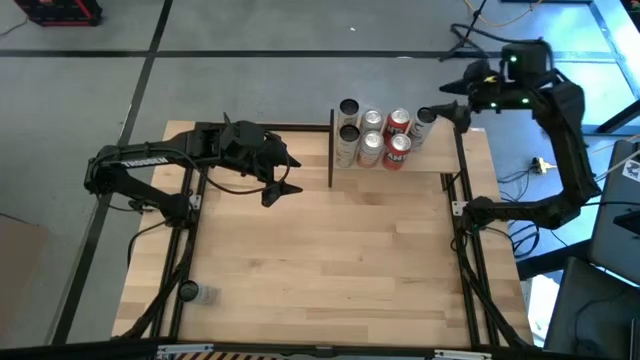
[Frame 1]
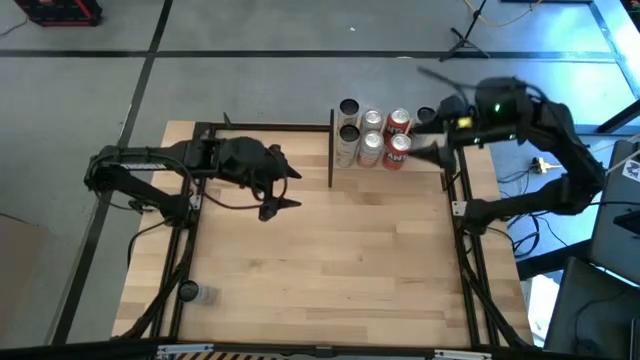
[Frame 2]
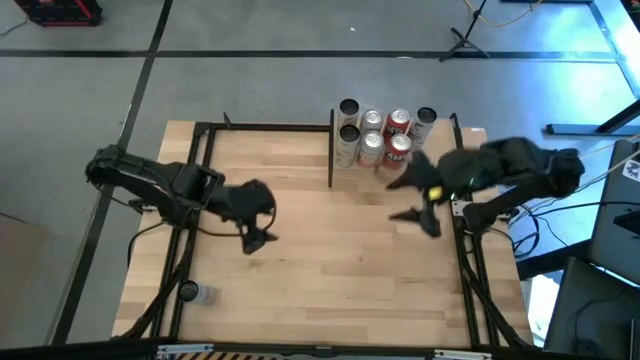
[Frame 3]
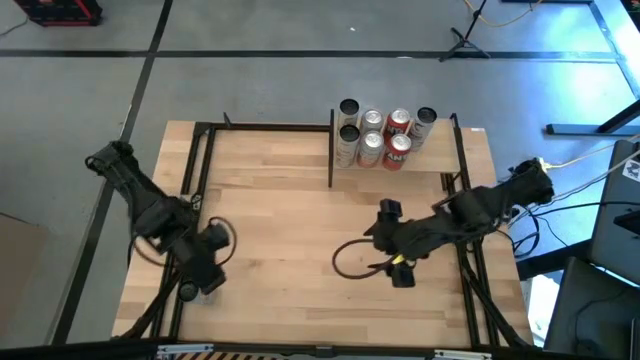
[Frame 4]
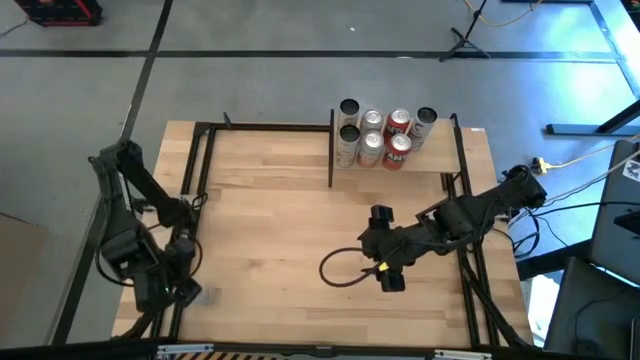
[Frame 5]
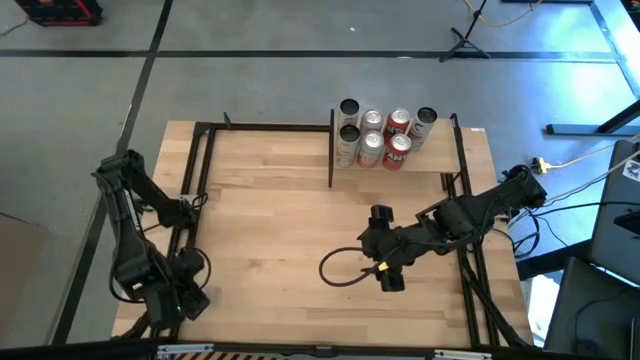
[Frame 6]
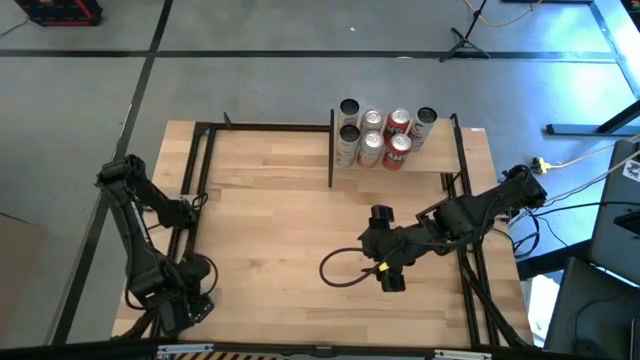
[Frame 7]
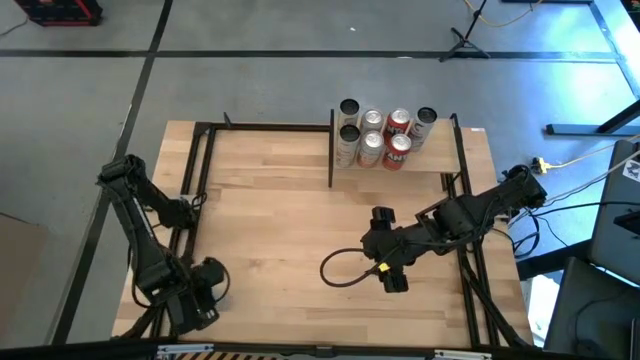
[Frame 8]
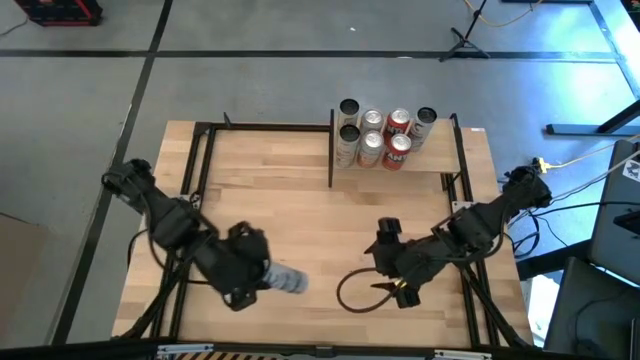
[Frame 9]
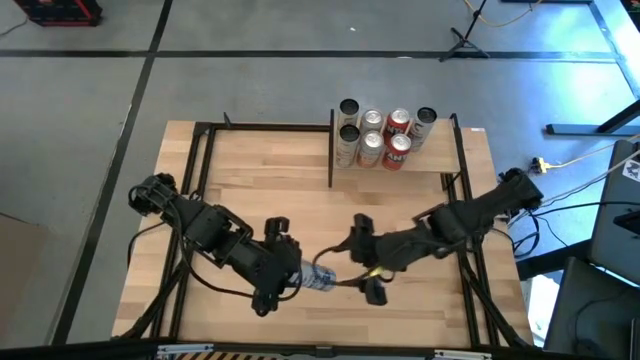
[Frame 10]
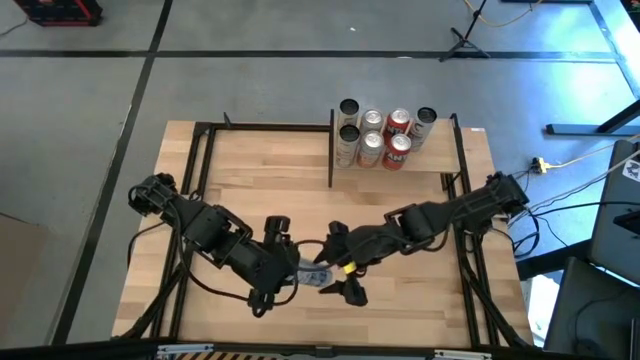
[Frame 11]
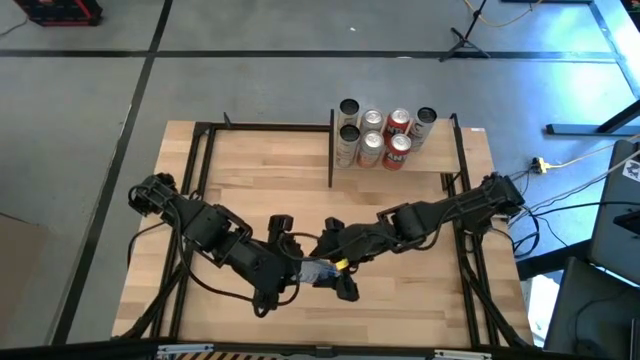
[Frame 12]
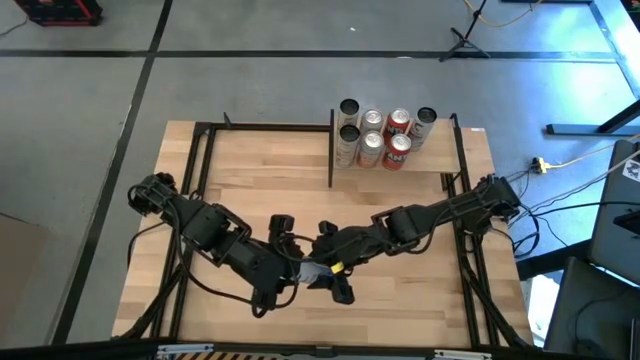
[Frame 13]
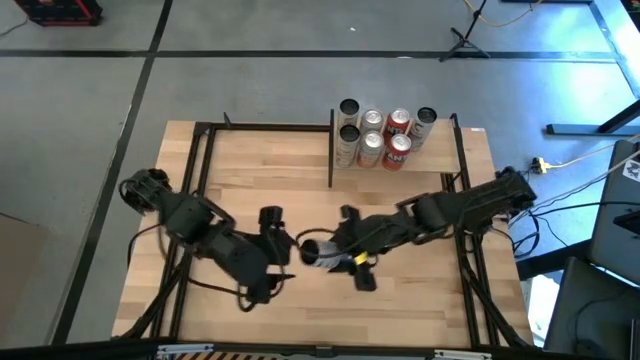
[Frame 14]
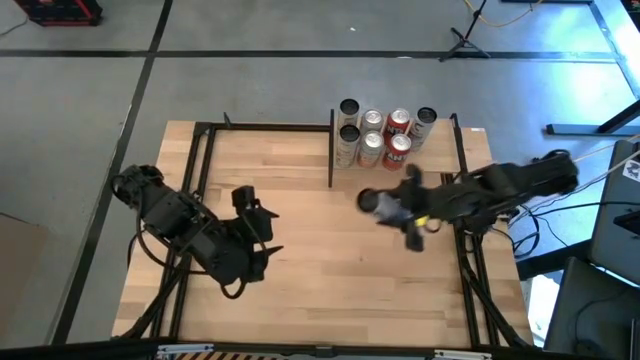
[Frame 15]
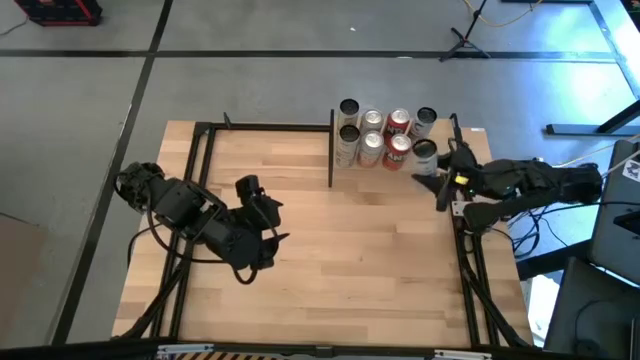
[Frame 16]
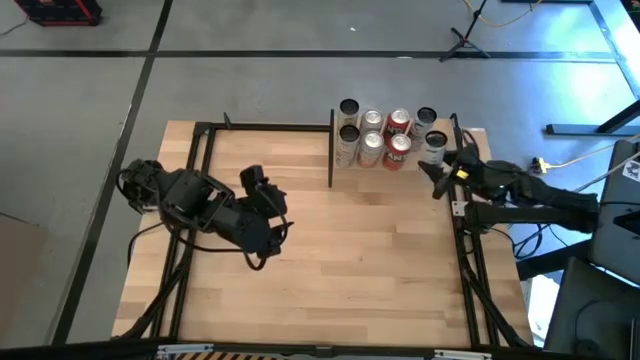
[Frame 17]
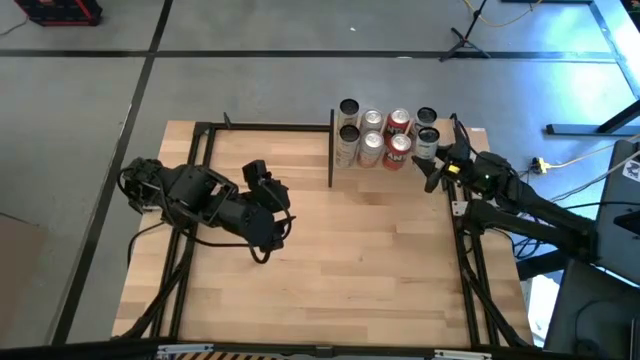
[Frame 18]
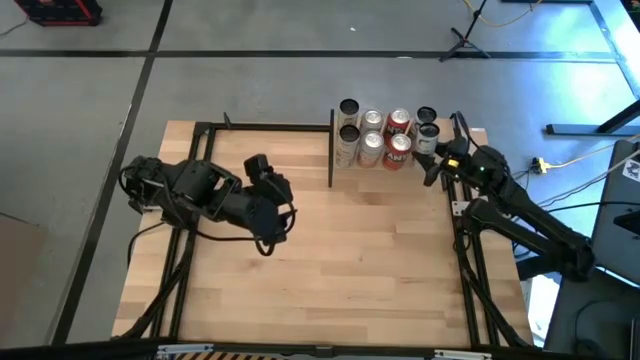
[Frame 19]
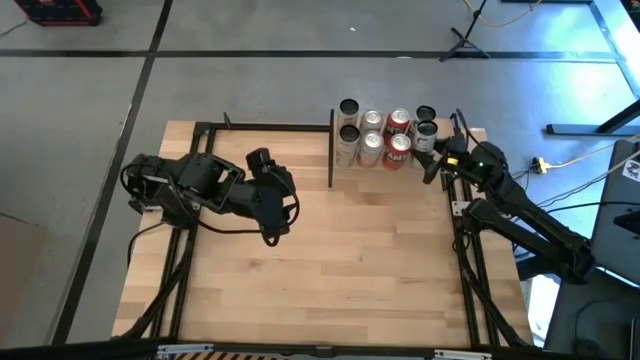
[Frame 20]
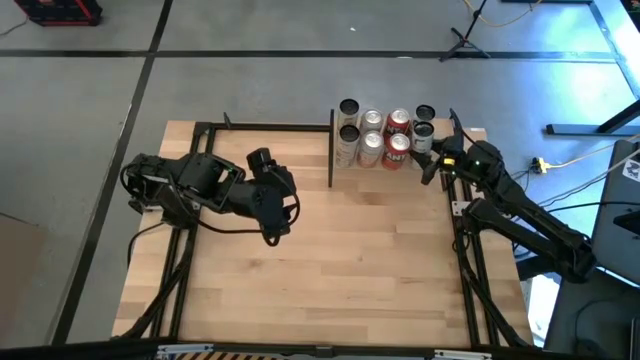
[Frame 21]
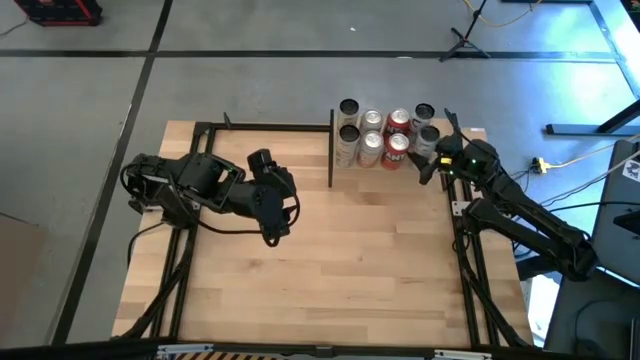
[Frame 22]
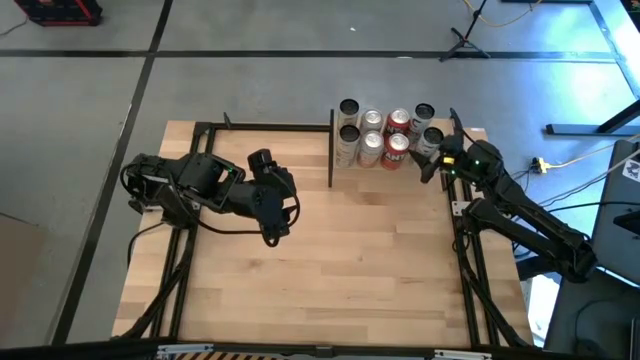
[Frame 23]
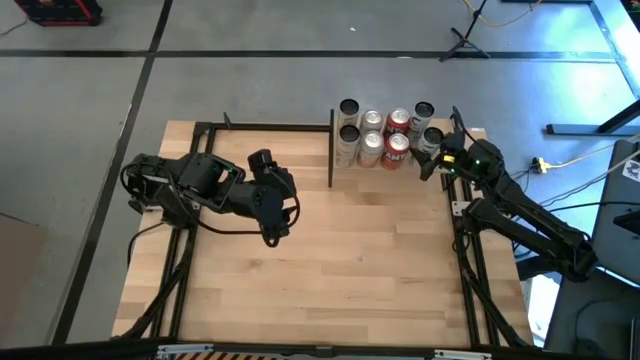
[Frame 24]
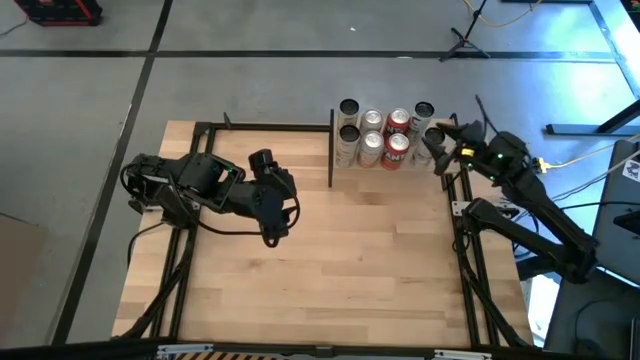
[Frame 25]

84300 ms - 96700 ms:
Task: Place canned beverage on shelf
Put the black soda can onto the shelf

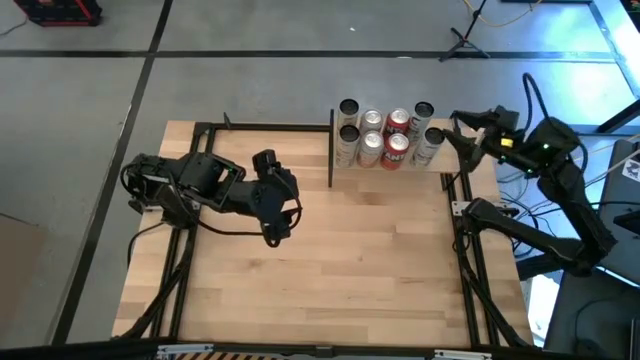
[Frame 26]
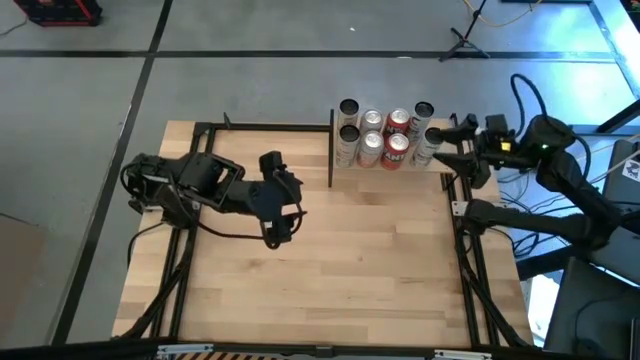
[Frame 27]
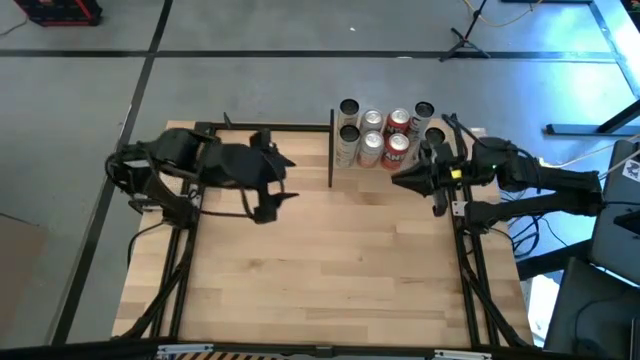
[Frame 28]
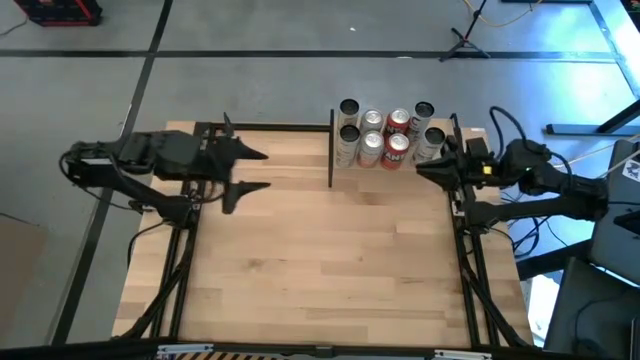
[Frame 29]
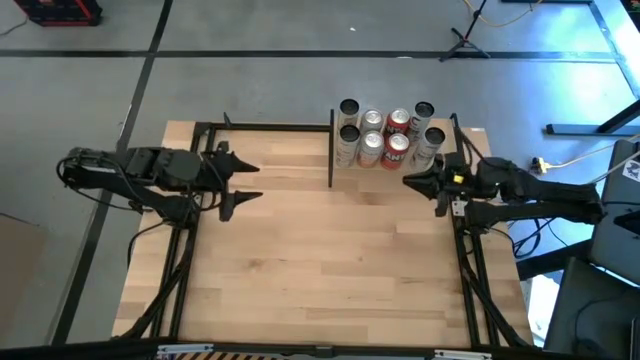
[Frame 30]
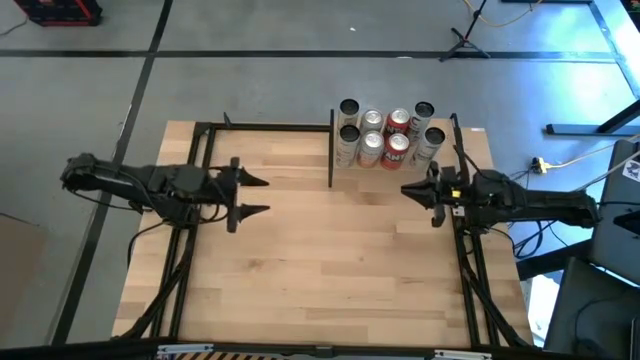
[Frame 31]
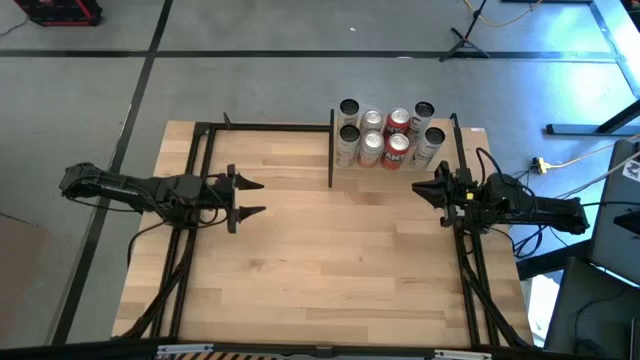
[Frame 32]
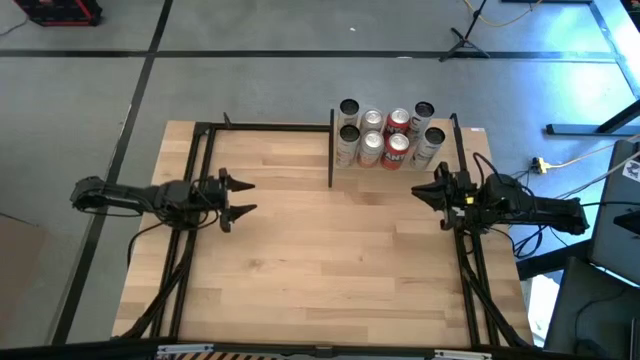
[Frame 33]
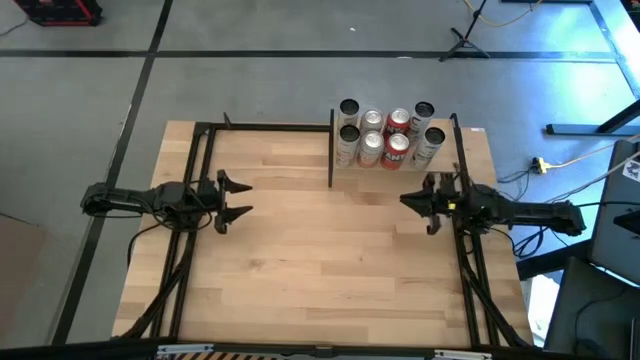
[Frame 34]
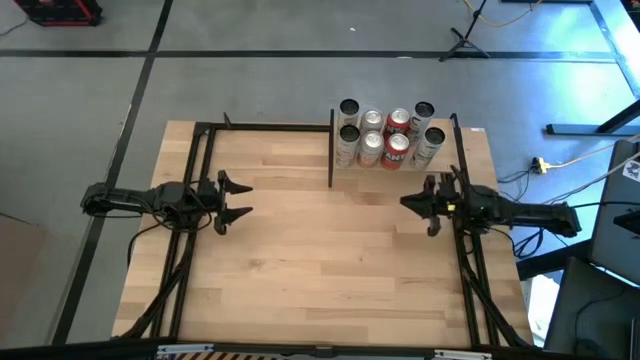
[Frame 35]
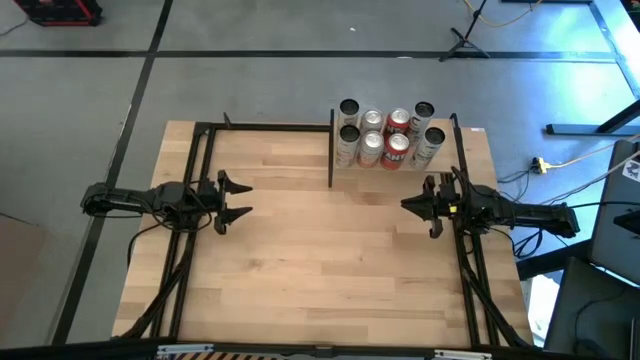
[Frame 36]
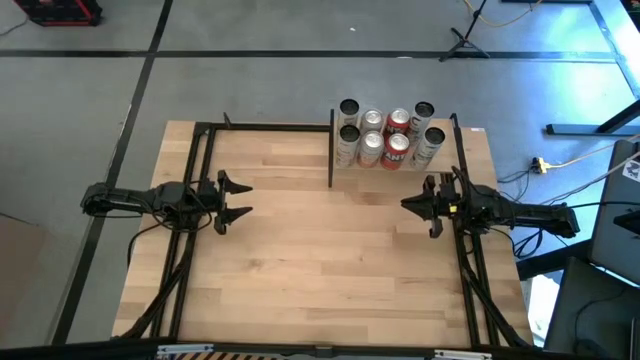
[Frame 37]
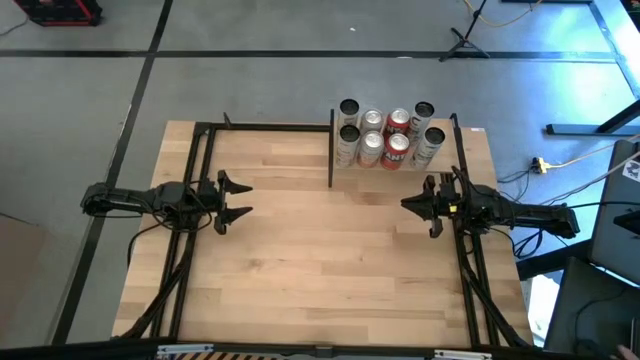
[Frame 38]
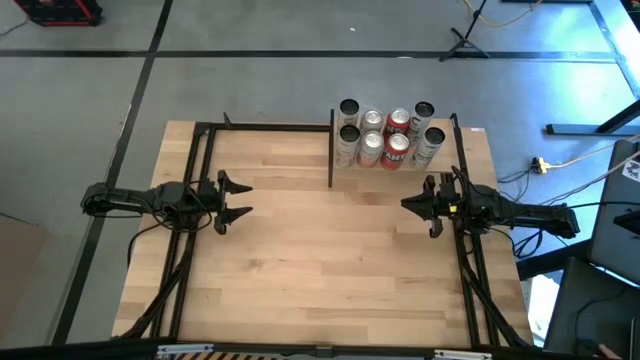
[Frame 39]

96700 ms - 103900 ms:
Return to Home Position

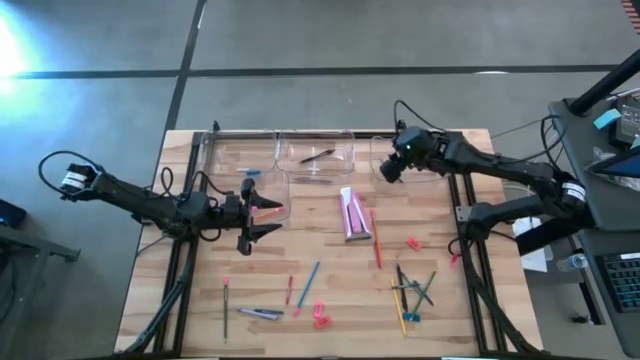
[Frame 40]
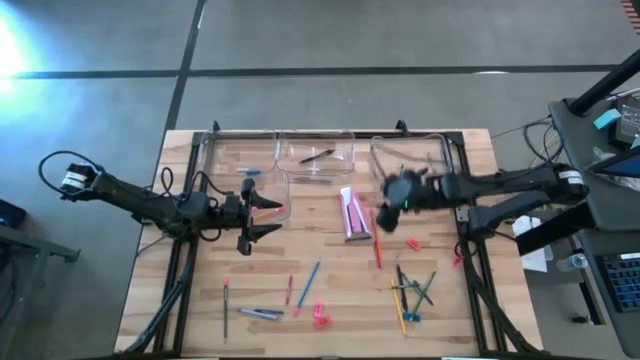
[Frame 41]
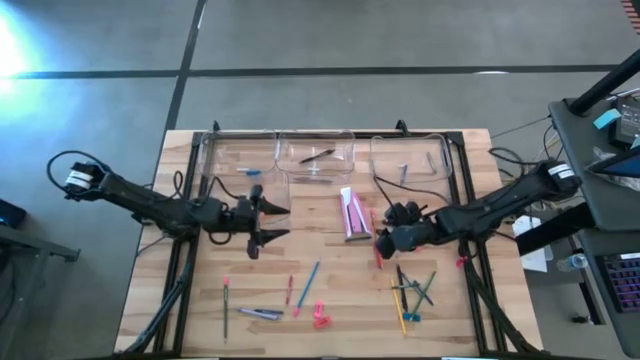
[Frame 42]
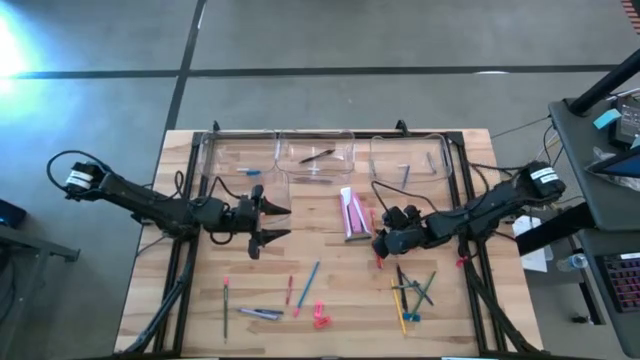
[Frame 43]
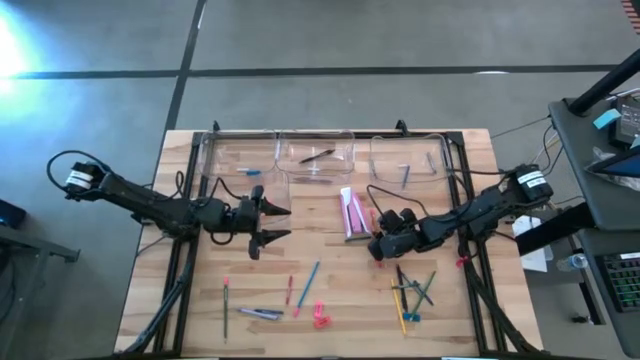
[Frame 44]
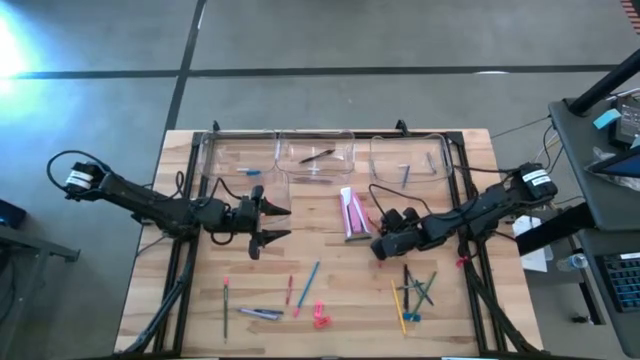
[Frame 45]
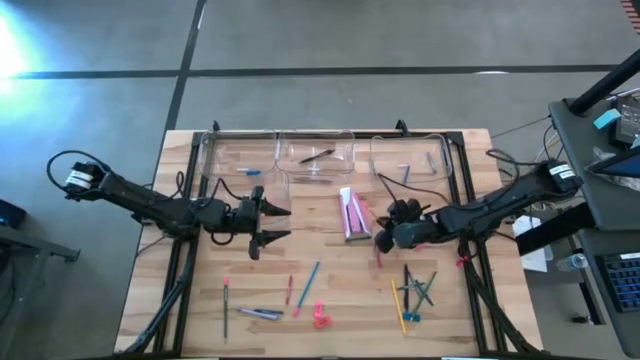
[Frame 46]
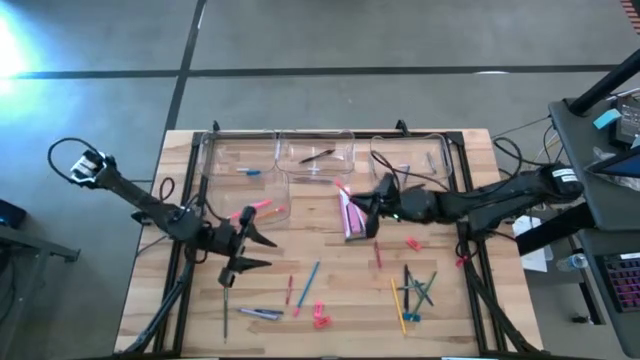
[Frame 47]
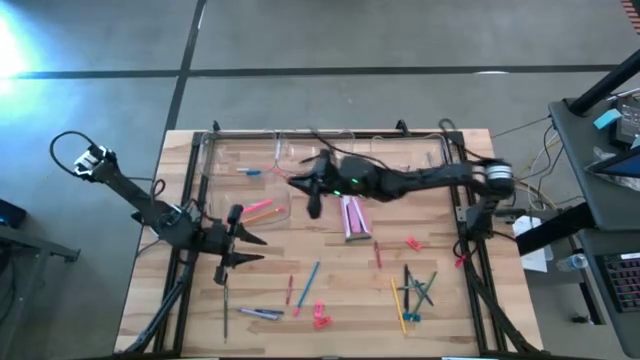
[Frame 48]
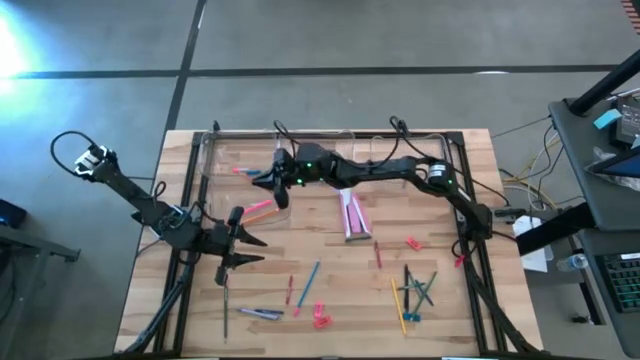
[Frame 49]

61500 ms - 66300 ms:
Task: Sort crayons/erasers/pens/pencils in bins
Put the orange pencil into the bottom left transparent bin
